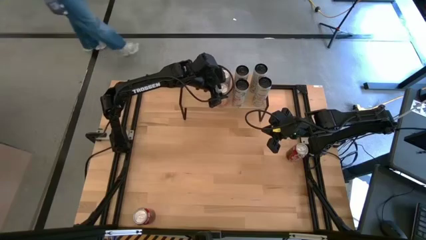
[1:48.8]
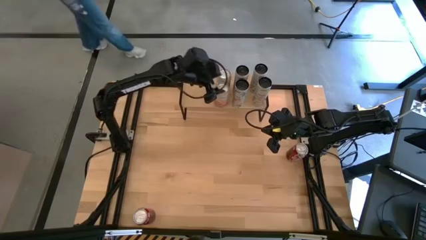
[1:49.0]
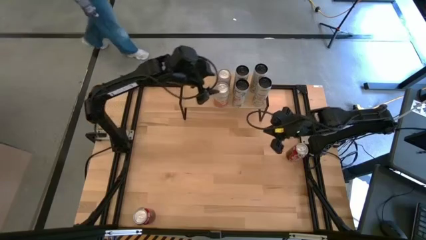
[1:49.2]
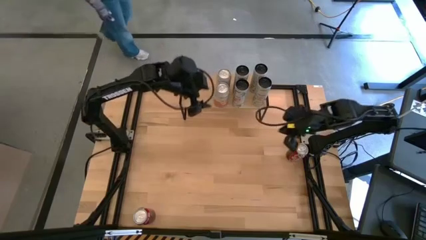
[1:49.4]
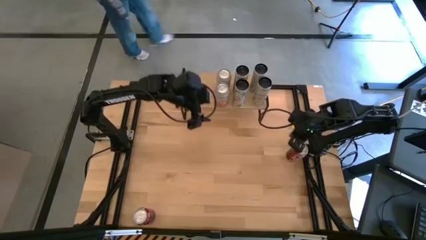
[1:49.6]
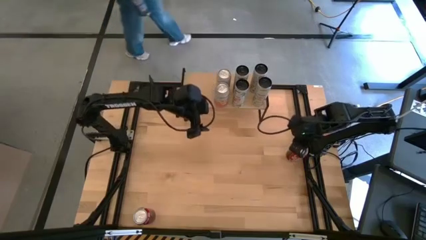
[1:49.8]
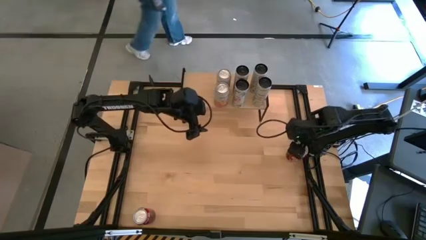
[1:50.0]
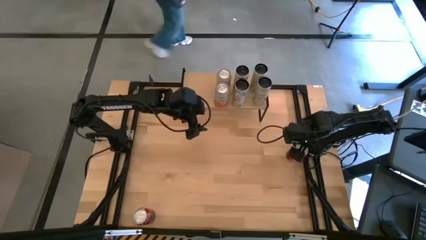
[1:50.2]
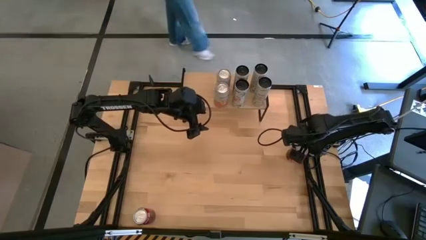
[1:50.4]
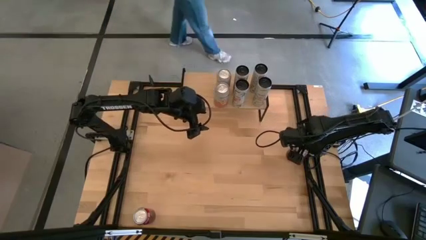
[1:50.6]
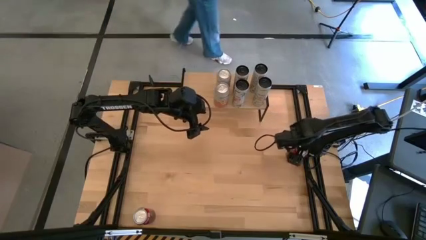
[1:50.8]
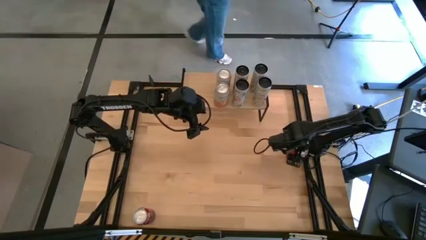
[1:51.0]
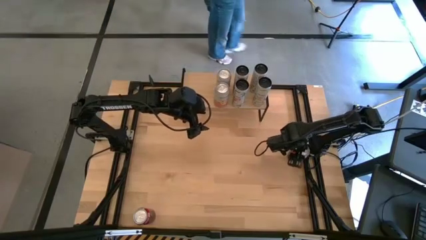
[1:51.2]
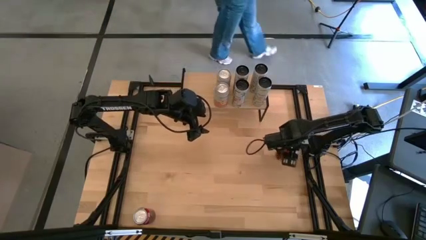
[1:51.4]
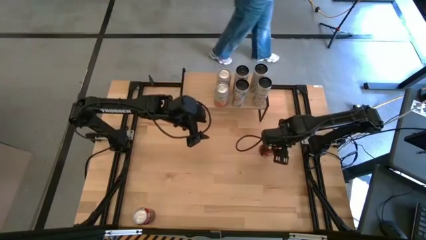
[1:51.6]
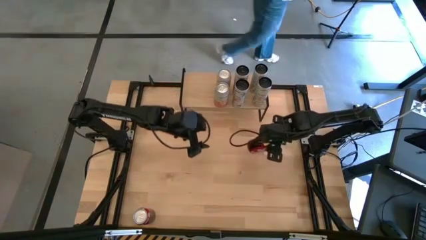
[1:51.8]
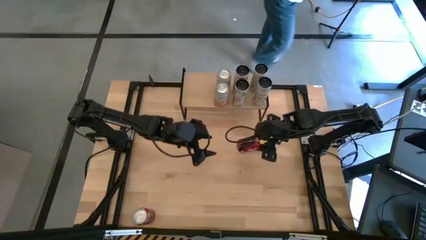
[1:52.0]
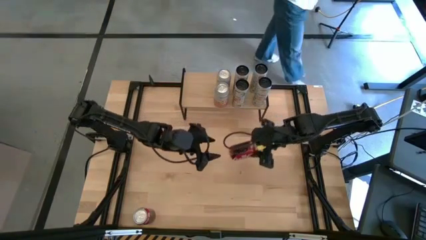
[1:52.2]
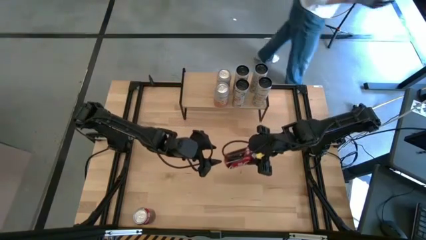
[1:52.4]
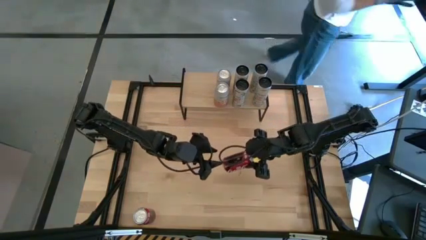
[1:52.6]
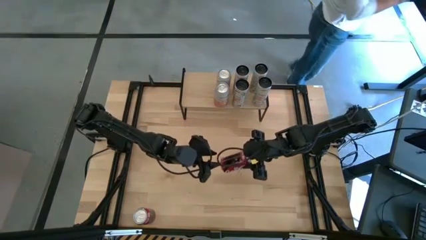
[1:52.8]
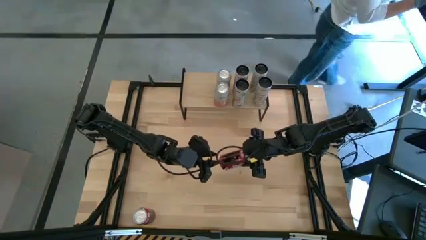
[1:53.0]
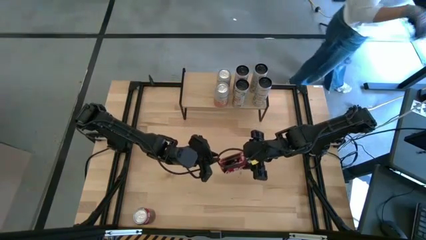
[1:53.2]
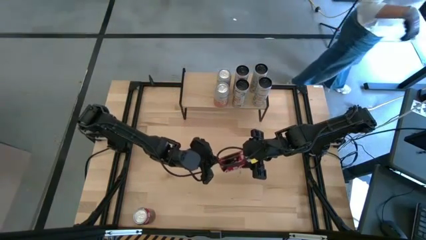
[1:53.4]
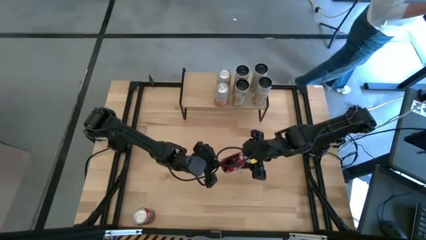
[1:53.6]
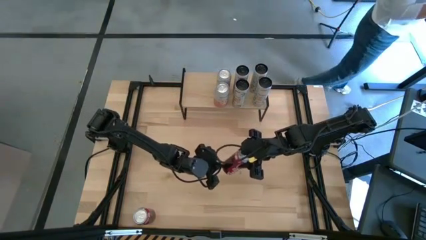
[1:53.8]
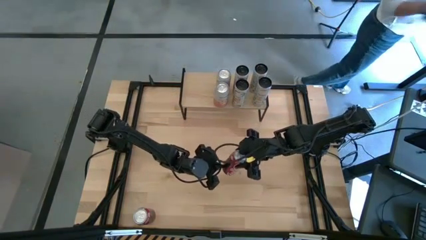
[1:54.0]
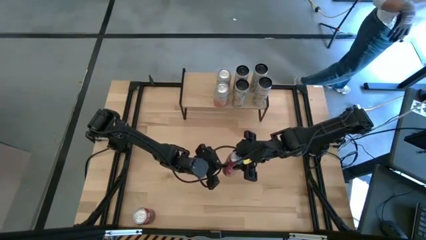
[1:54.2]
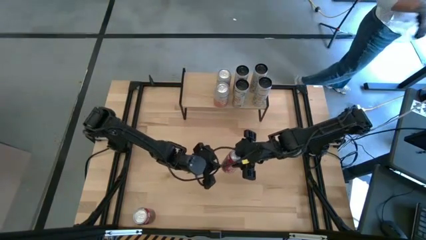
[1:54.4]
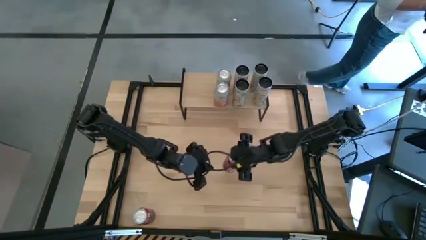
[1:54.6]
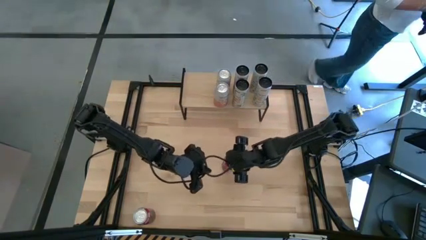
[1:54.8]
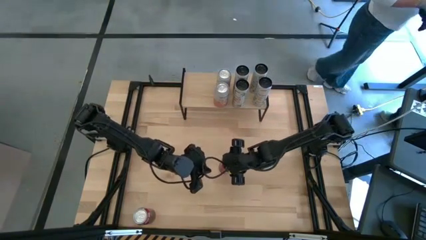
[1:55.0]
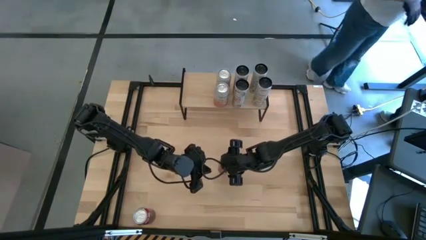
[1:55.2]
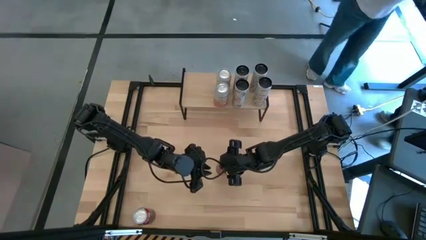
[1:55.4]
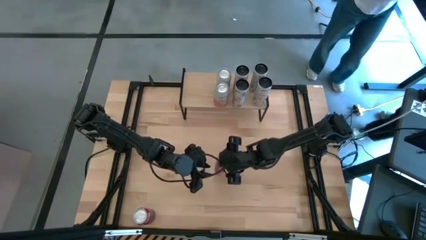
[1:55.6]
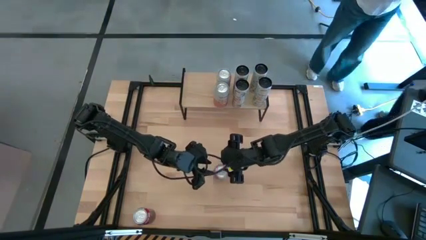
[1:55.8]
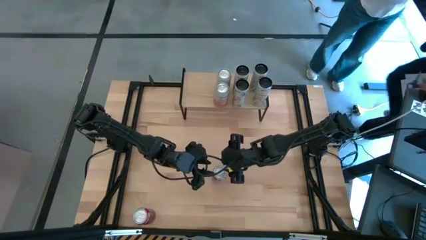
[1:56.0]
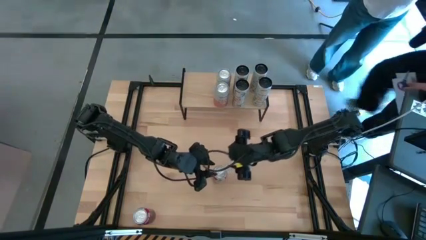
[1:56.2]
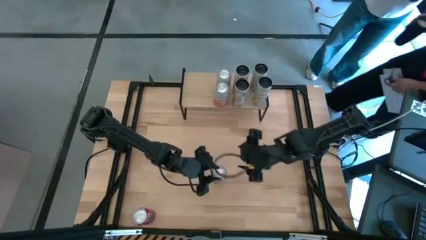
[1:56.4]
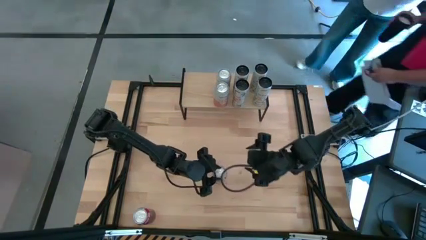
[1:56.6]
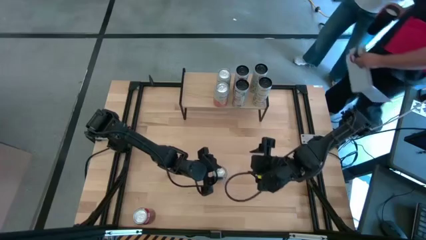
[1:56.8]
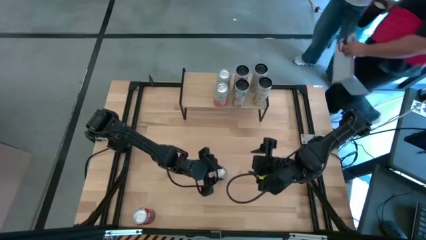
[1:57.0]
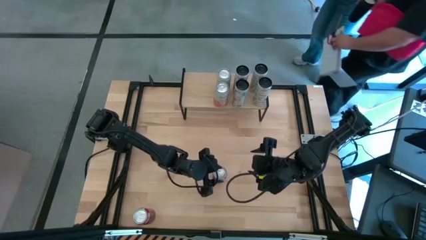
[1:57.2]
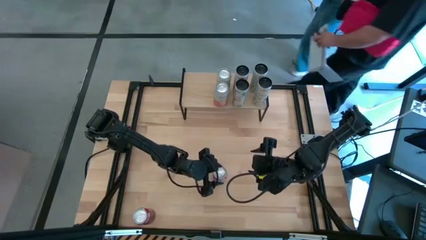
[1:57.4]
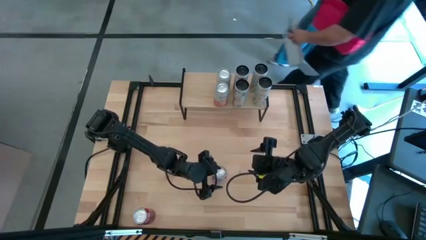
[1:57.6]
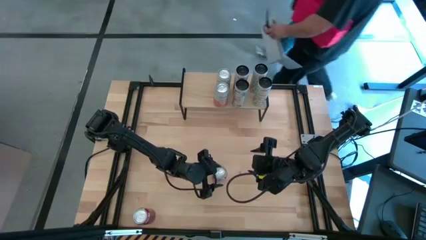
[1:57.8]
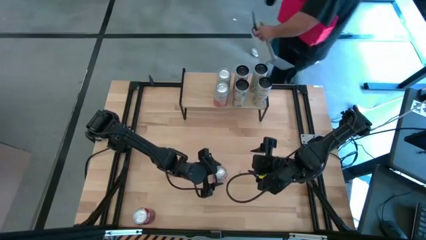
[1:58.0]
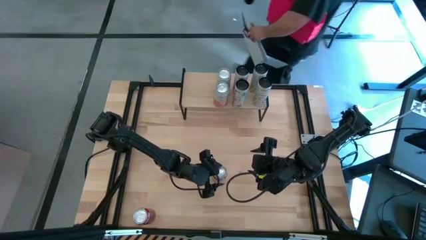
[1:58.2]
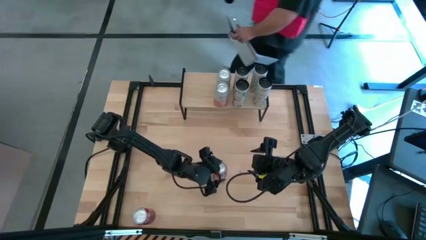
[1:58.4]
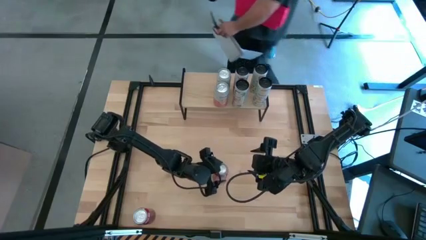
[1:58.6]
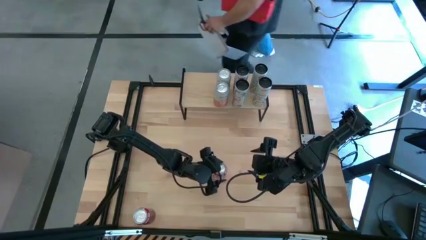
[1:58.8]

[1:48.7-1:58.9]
Task: Place canned beverage on shelf
Put the right red soda can on the shelf

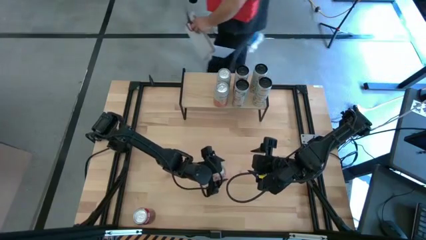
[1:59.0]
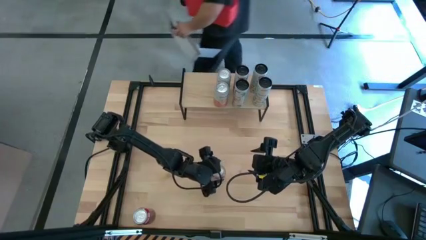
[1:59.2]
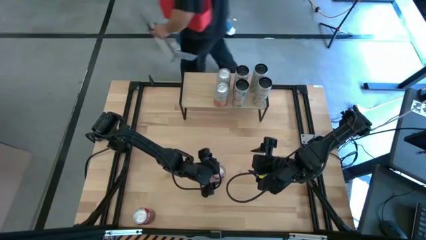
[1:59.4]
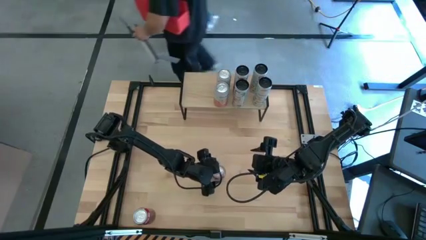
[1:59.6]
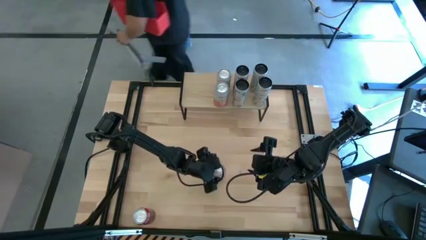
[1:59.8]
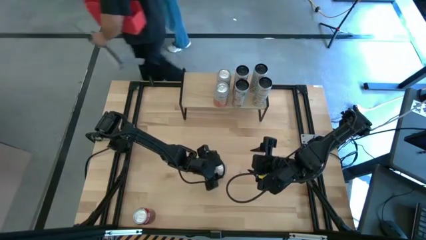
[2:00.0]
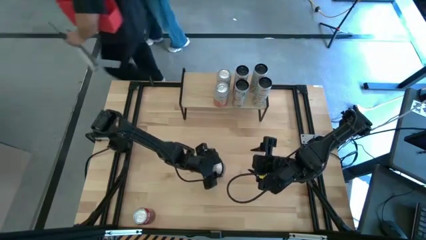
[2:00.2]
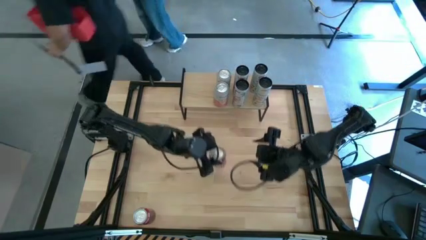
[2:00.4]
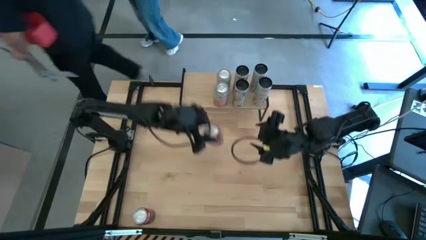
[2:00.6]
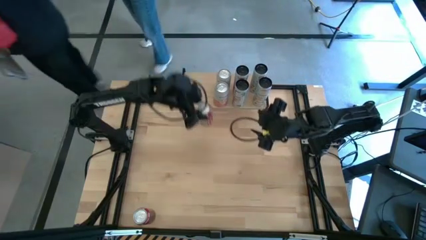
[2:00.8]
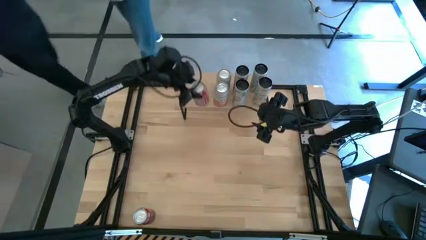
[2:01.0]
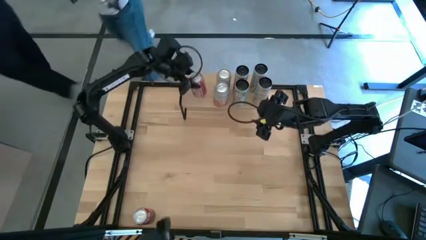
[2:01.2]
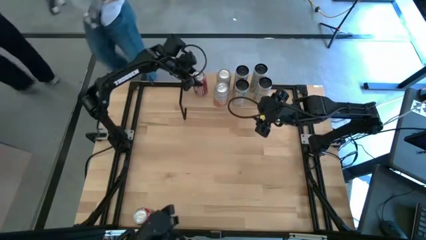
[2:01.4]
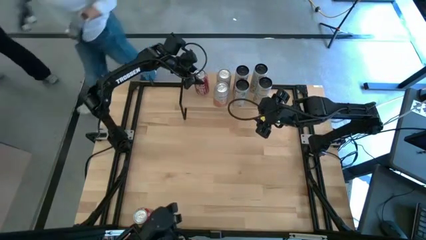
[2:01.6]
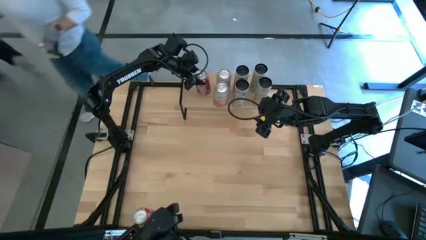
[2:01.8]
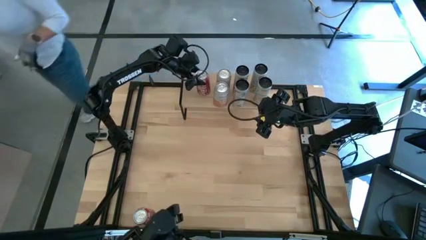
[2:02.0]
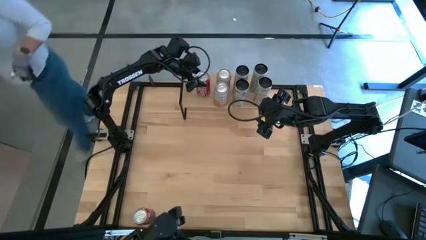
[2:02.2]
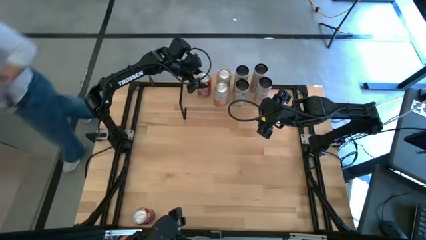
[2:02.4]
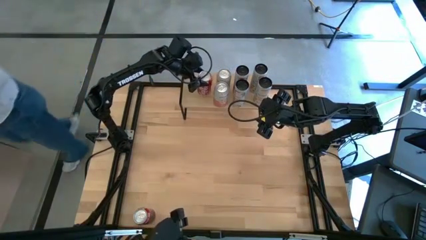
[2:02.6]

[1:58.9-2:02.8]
Put the right red soda can on the shelf
